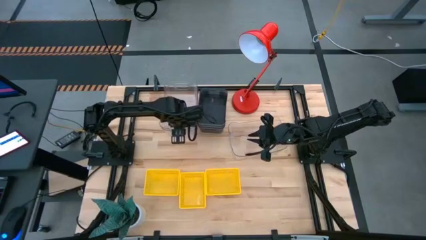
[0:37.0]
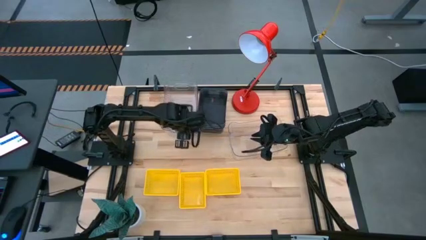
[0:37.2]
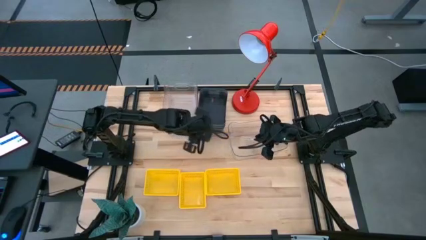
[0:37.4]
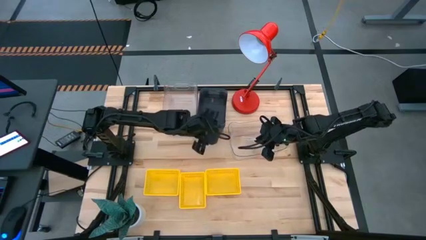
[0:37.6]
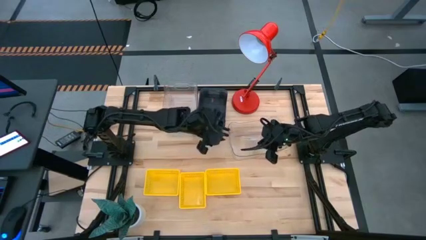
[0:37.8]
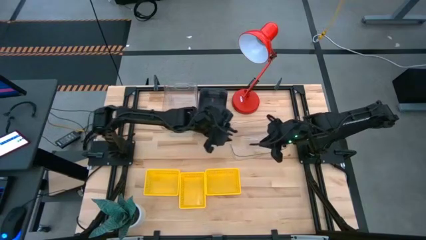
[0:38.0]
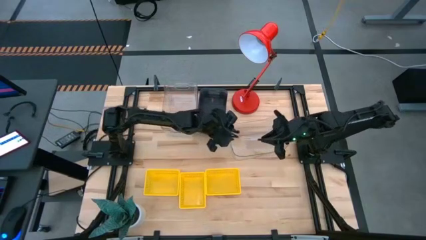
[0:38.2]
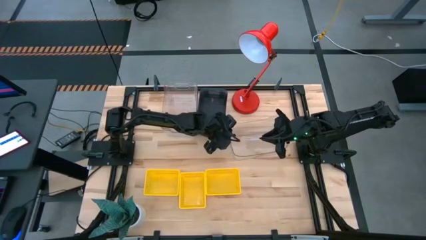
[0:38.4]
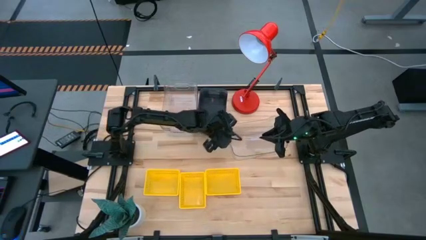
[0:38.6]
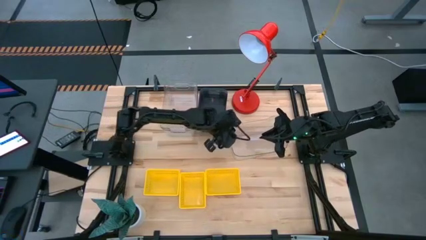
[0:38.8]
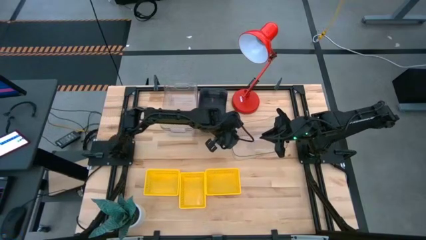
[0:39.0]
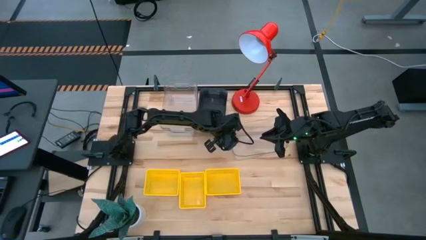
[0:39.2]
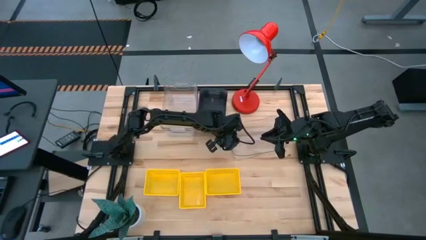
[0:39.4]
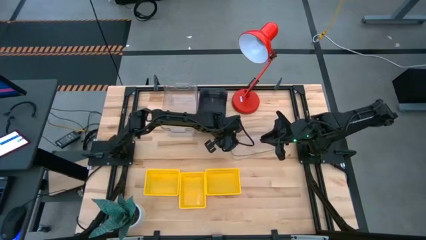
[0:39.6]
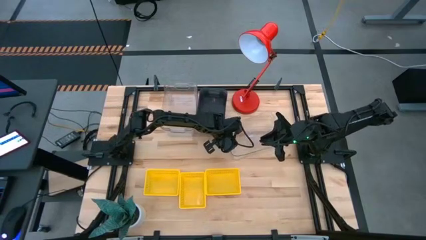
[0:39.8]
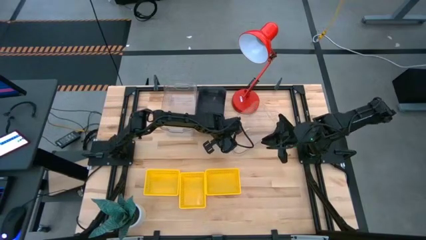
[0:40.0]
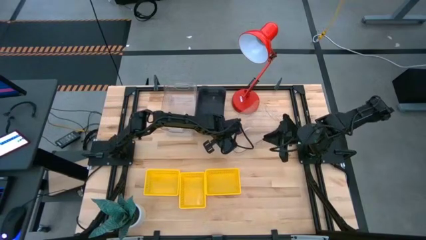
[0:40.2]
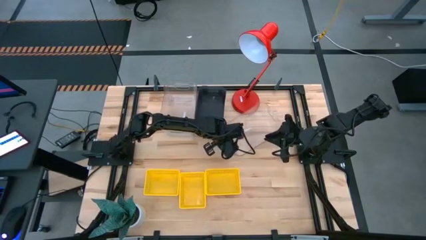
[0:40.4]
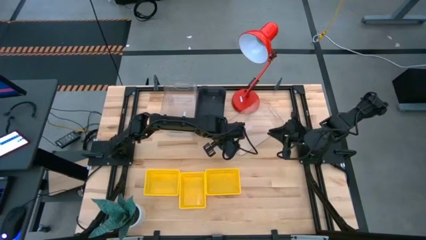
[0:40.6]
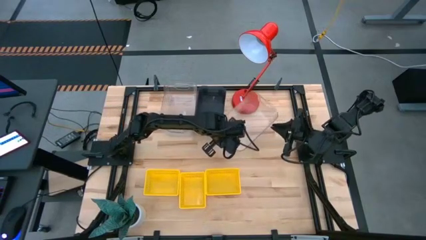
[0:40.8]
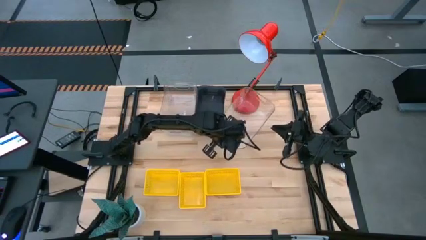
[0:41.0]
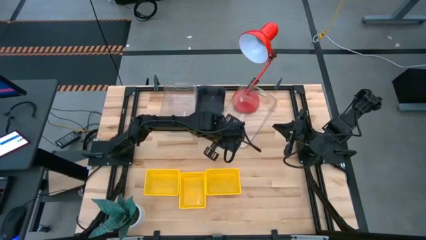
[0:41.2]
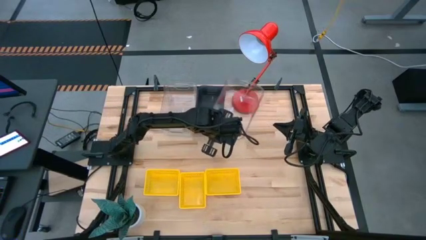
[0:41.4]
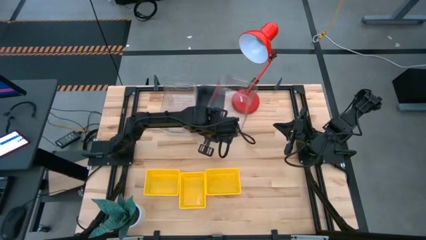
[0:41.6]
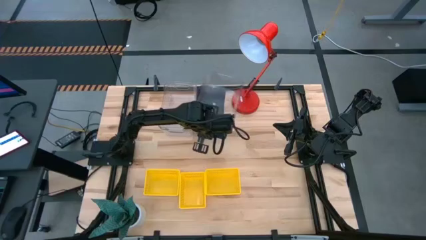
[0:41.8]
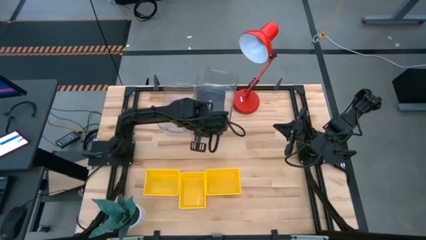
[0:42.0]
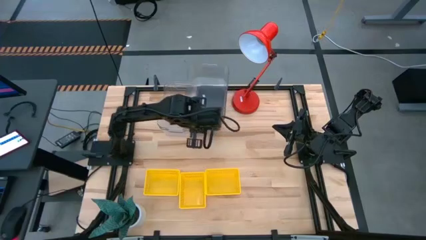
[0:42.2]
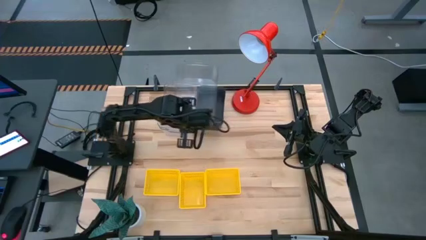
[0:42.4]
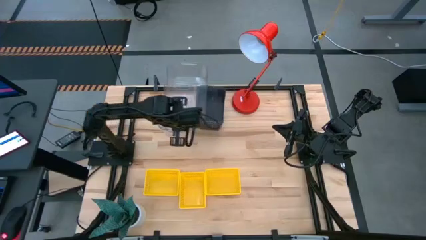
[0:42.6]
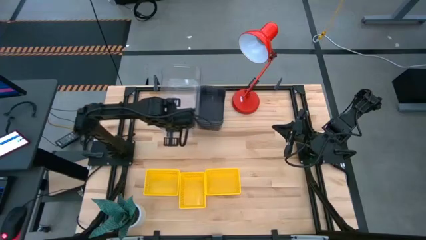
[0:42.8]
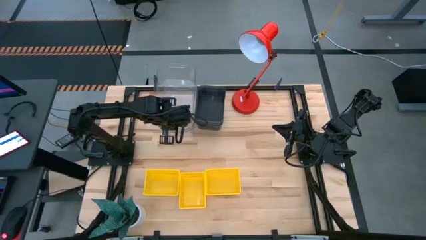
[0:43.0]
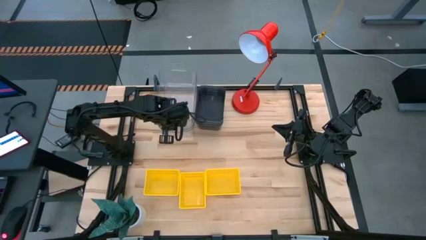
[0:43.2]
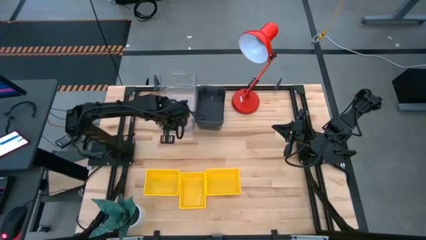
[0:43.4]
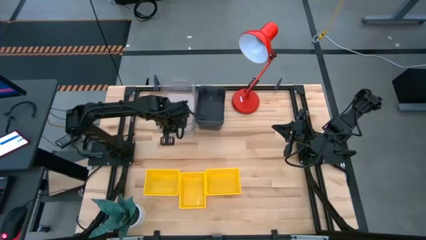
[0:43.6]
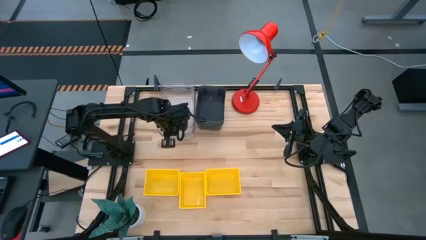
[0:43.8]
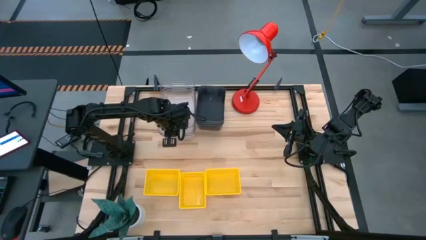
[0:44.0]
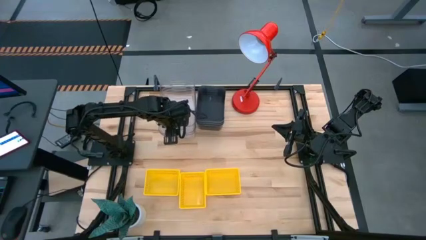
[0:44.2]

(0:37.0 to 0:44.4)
Stack the bottom transparent bin on the transparent bins

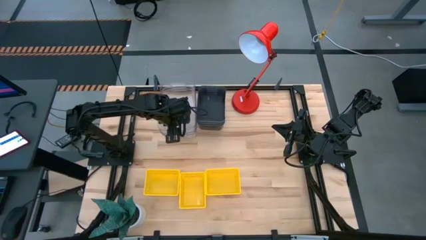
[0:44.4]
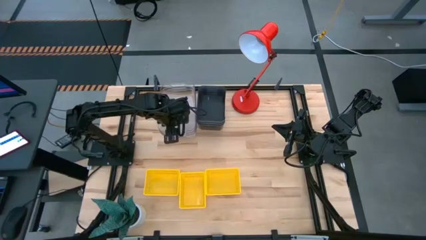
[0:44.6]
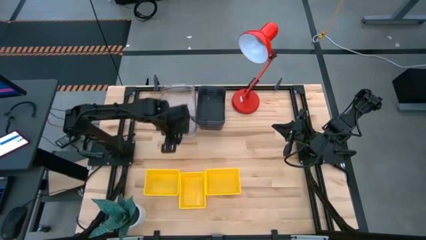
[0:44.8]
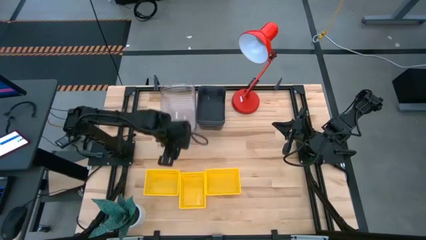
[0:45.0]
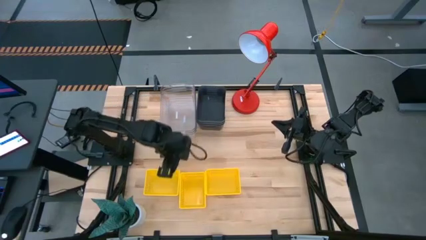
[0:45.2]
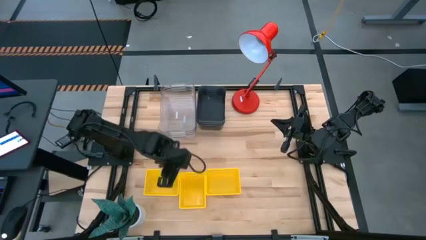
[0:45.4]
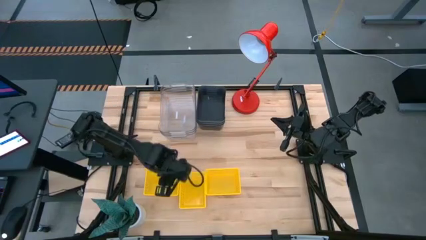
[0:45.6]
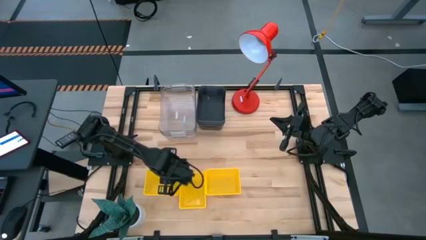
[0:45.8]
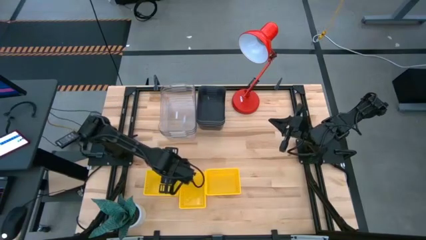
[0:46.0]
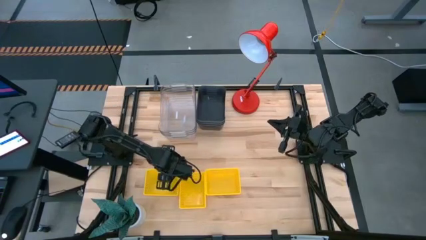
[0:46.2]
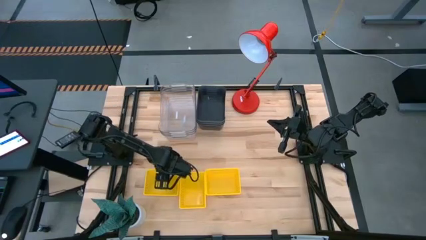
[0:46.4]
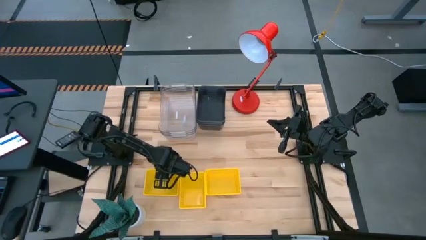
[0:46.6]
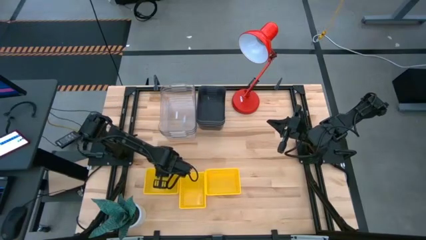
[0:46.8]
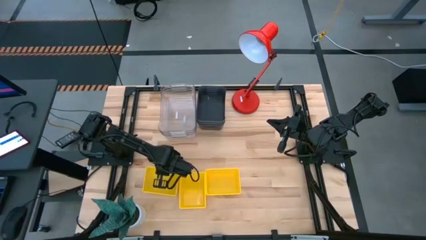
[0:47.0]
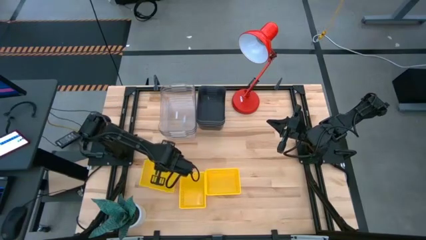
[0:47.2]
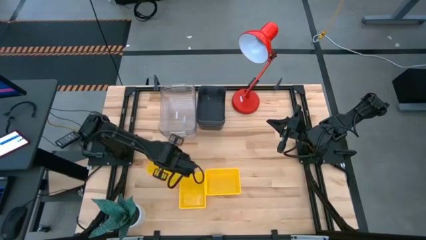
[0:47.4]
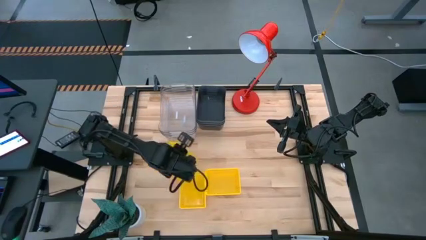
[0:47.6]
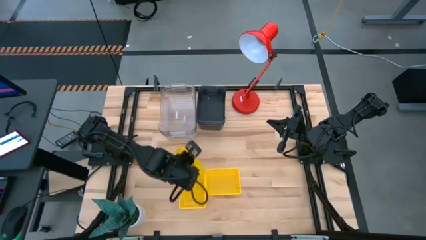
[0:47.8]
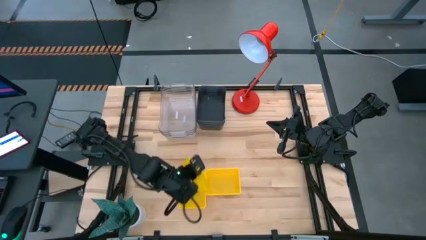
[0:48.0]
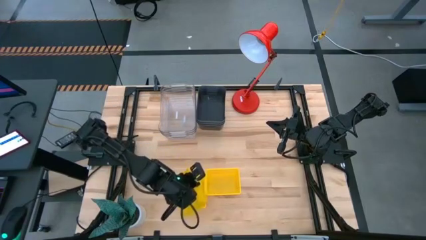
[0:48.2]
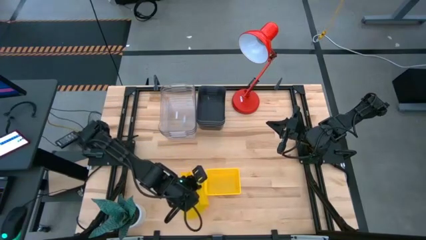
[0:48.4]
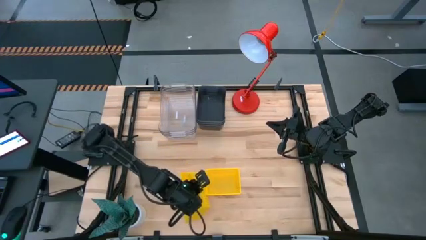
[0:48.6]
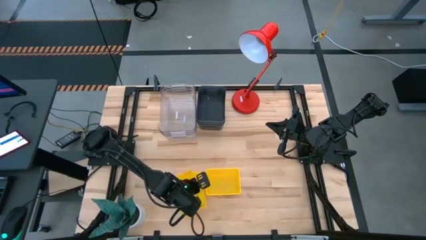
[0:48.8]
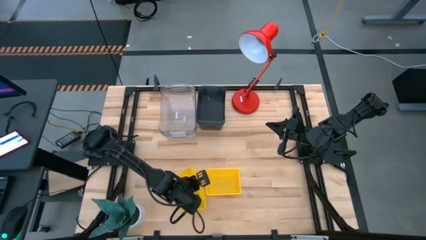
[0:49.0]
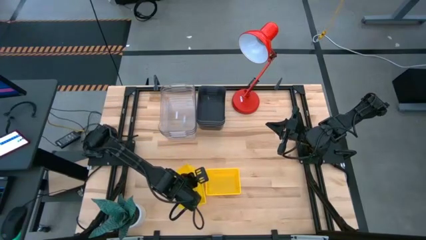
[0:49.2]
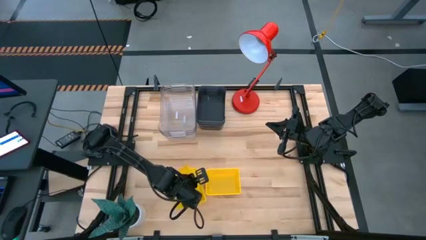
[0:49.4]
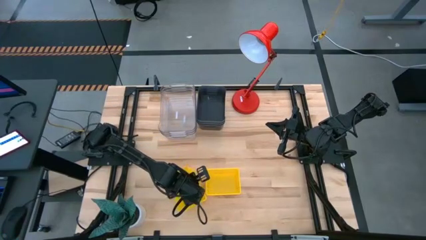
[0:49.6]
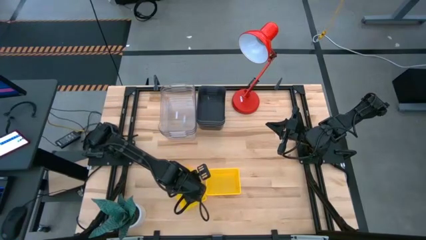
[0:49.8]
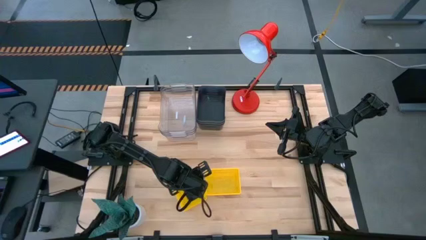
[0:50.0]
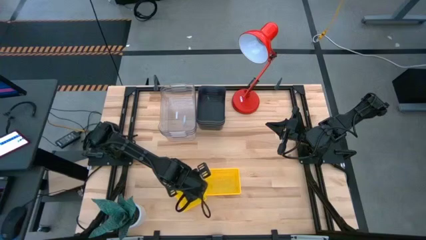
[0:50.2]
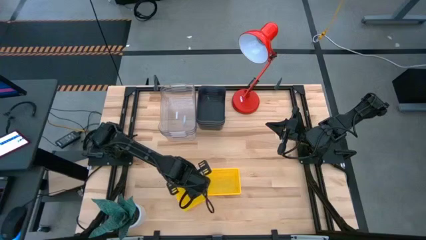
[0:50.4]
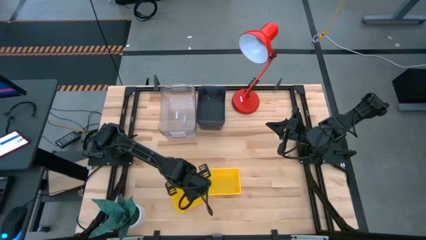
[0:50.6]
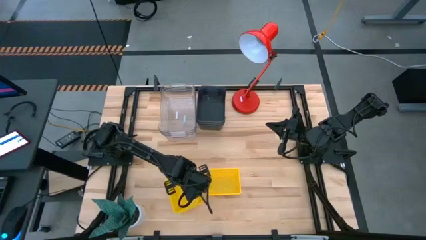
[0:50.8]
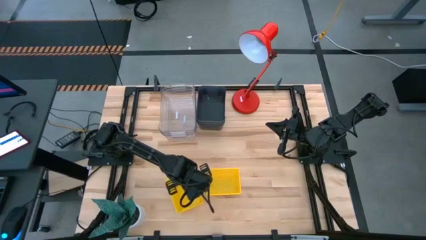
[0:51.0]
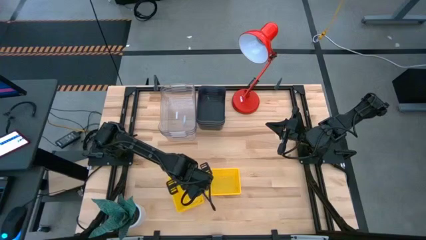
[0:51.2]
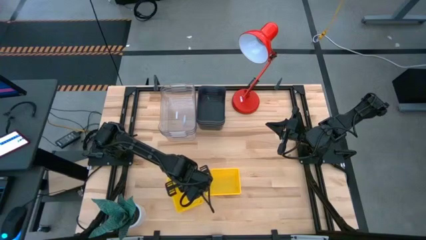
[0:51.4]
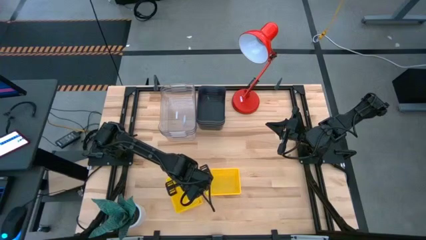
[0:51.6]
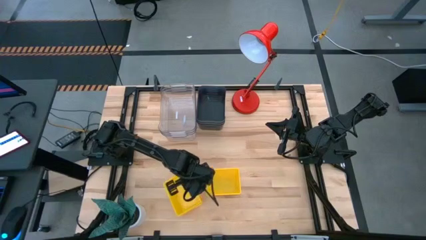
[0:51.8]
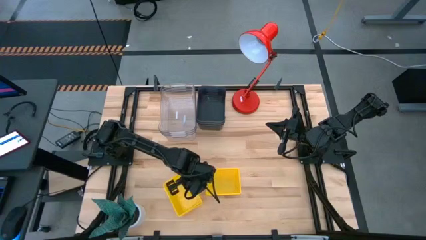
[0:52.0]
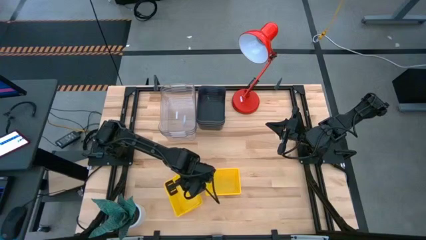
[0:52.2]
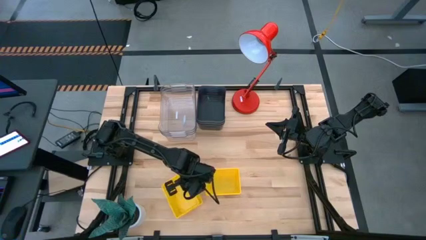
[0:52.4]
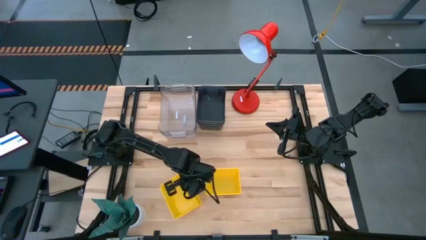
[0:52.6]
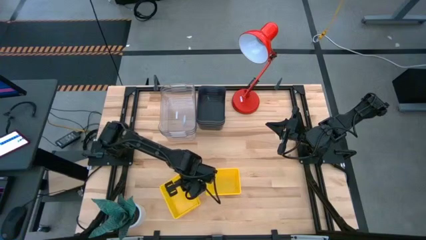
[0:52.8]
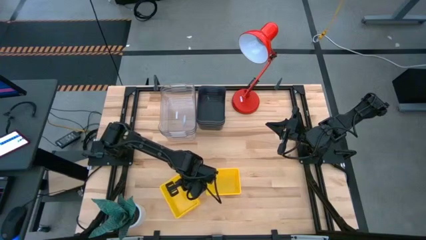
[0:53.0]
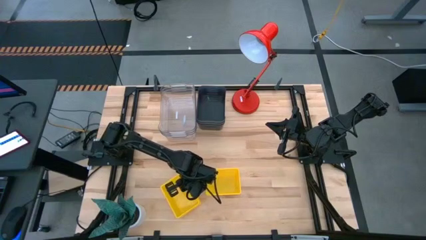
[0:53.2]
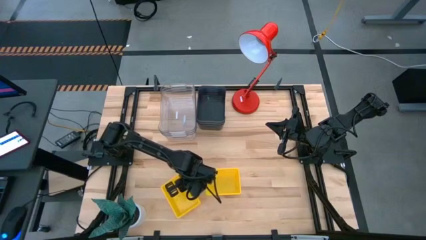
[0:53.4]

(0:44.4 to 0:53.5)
Stack the left yellow bin on the center yellow bin
